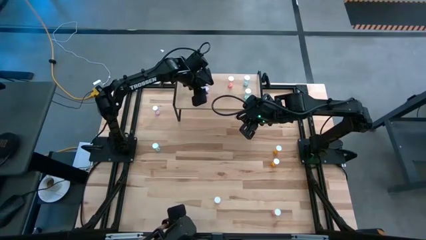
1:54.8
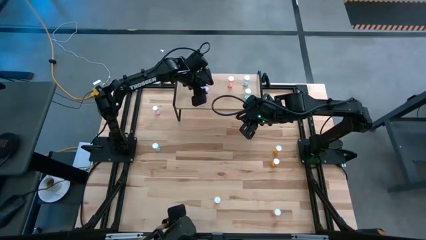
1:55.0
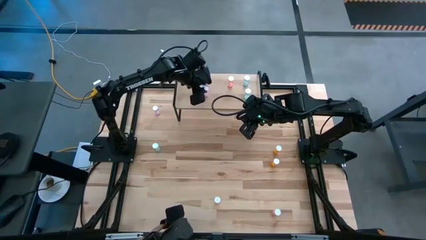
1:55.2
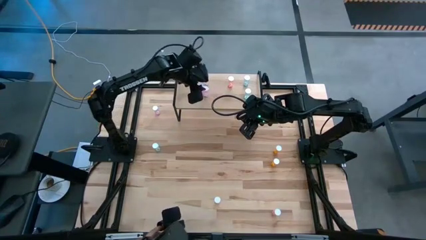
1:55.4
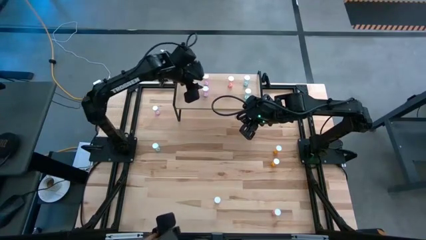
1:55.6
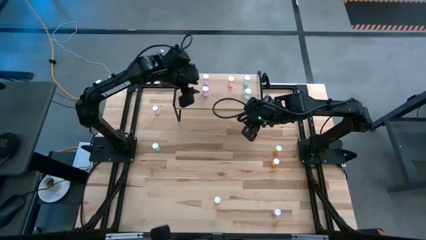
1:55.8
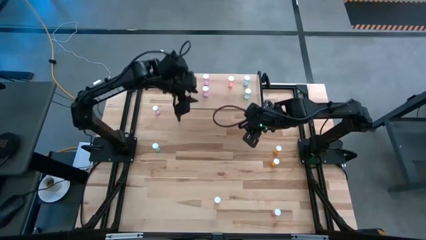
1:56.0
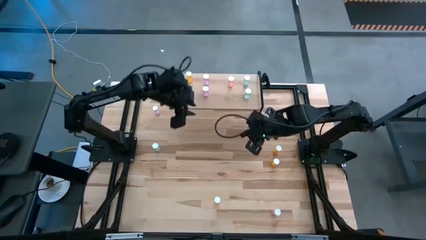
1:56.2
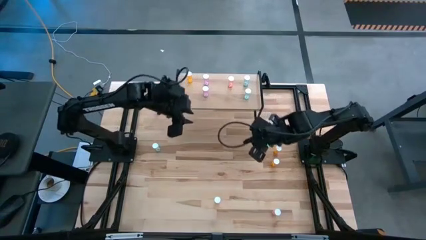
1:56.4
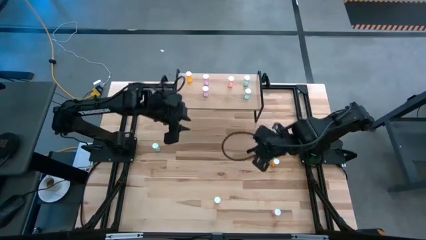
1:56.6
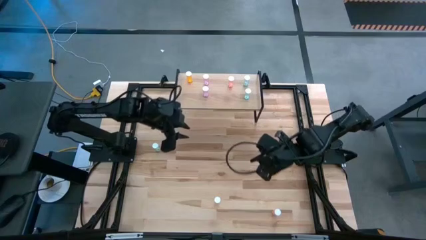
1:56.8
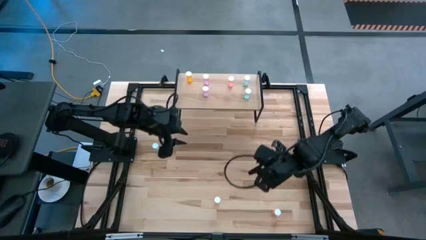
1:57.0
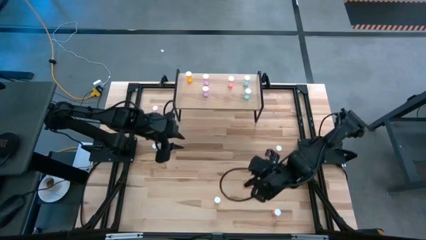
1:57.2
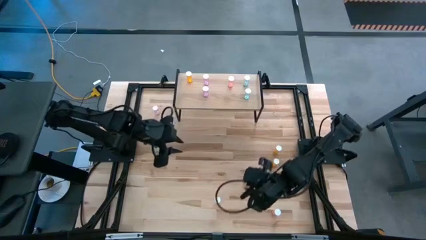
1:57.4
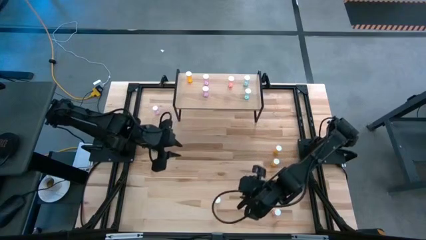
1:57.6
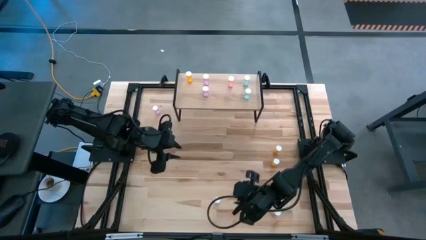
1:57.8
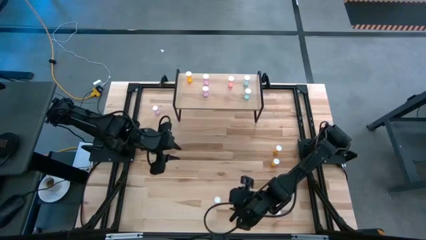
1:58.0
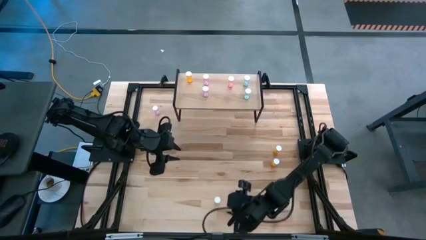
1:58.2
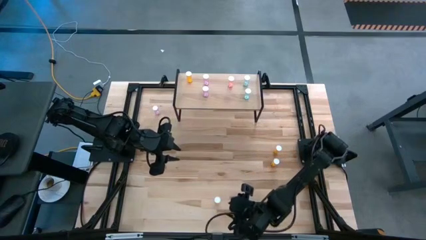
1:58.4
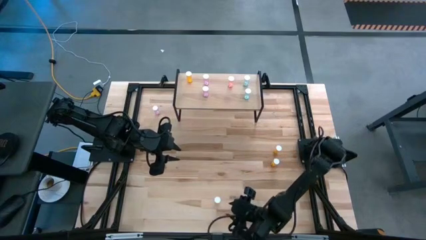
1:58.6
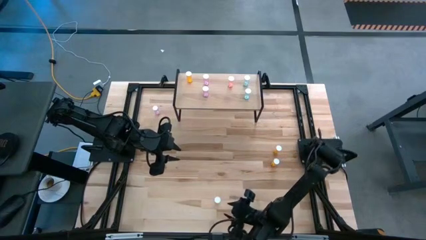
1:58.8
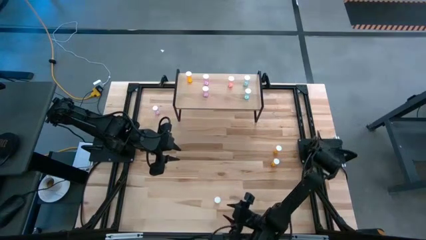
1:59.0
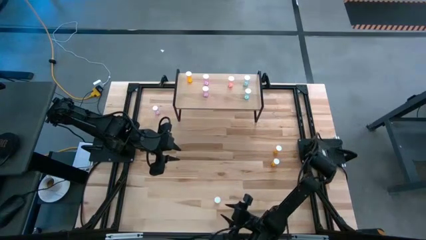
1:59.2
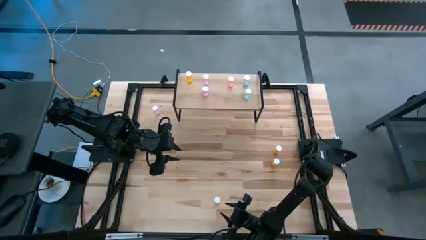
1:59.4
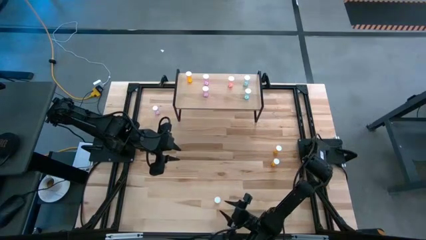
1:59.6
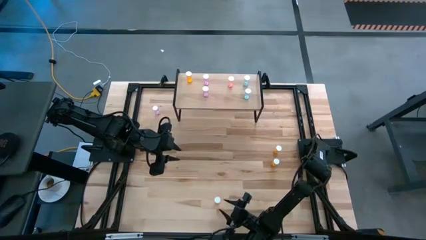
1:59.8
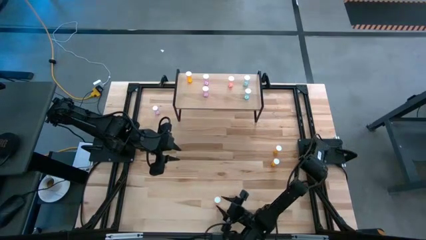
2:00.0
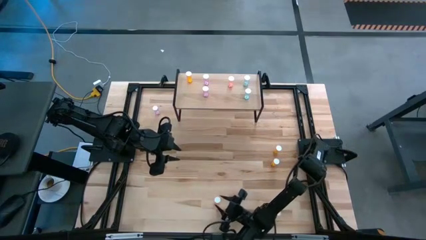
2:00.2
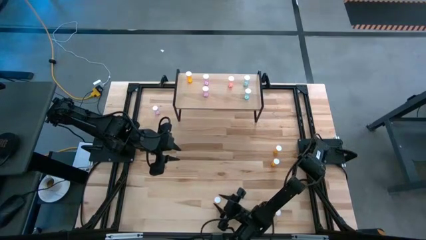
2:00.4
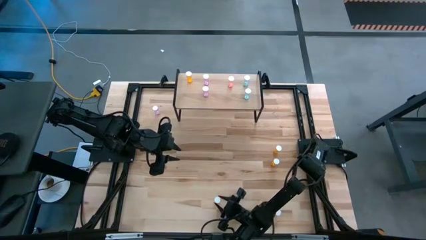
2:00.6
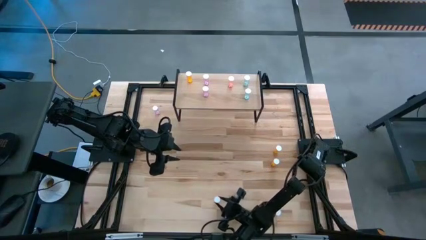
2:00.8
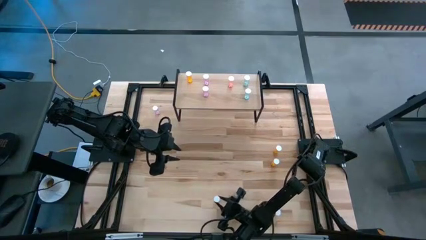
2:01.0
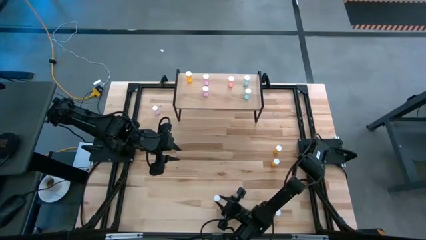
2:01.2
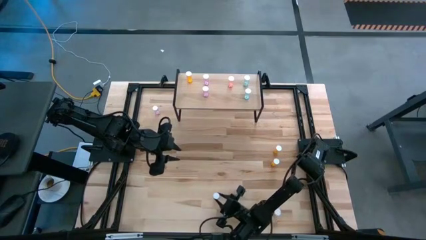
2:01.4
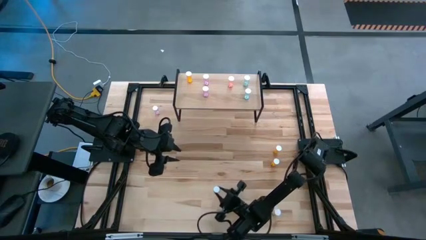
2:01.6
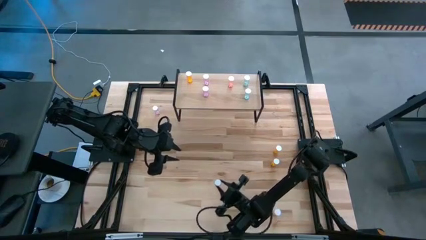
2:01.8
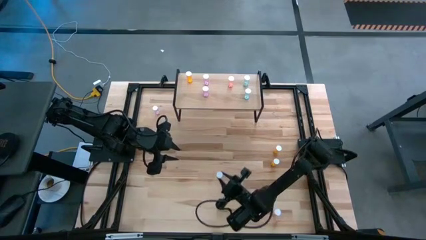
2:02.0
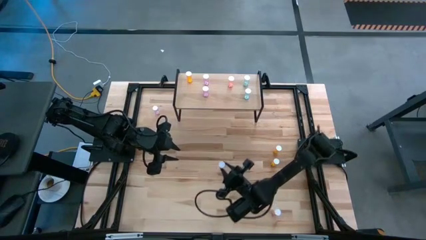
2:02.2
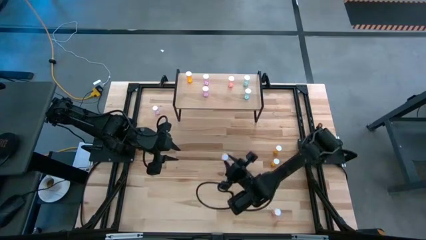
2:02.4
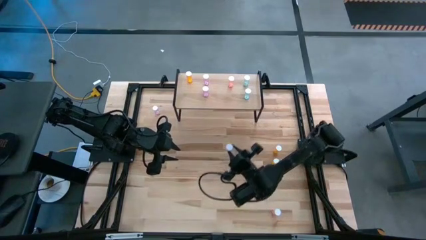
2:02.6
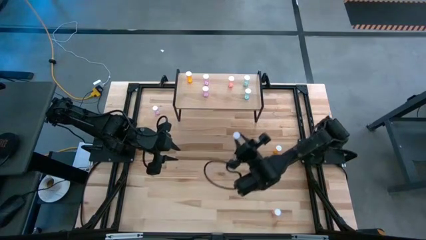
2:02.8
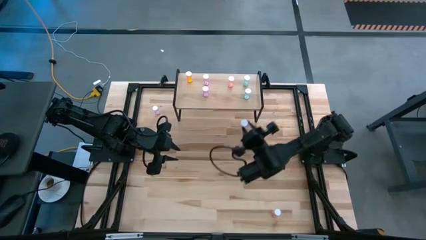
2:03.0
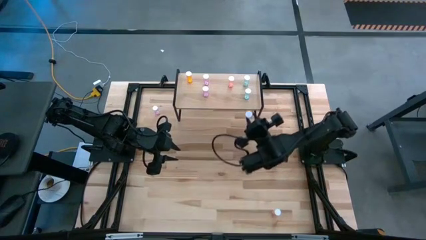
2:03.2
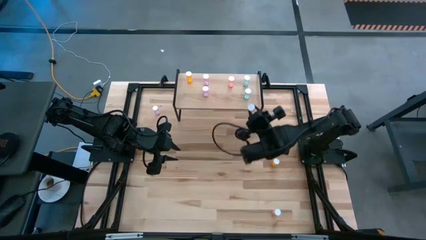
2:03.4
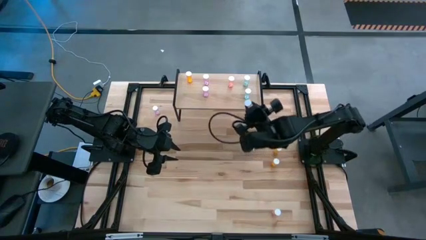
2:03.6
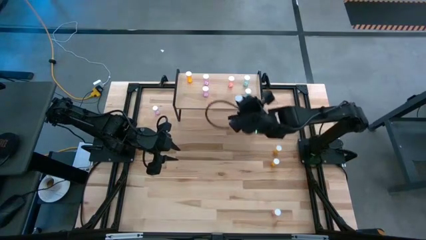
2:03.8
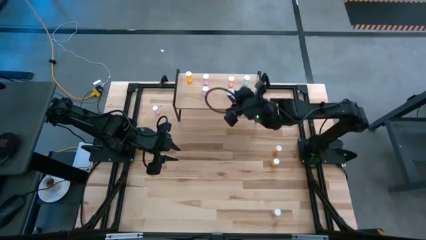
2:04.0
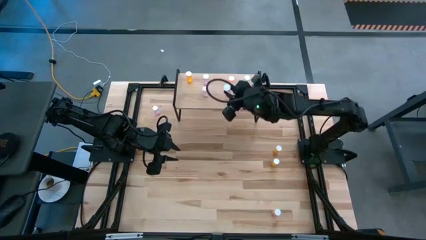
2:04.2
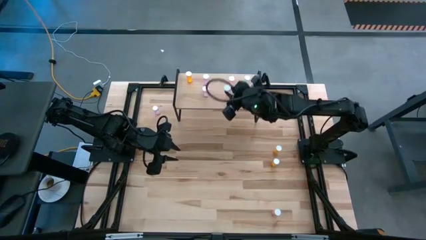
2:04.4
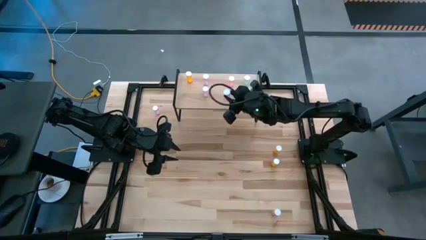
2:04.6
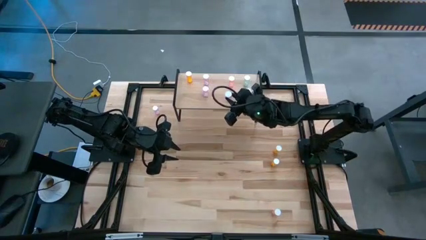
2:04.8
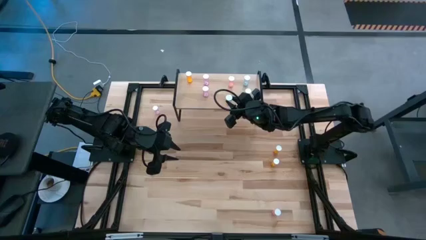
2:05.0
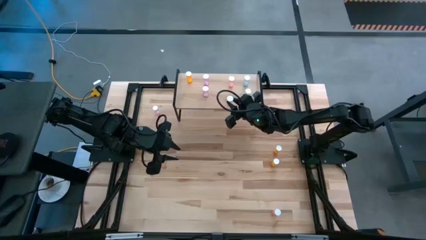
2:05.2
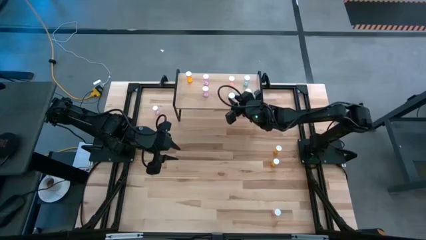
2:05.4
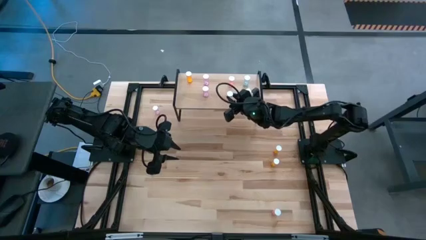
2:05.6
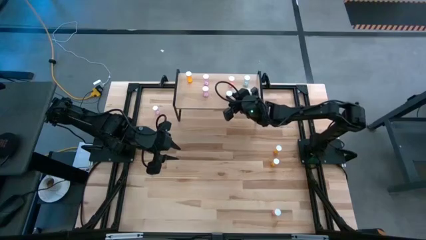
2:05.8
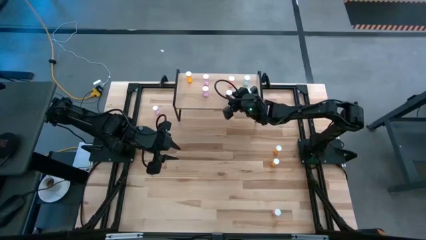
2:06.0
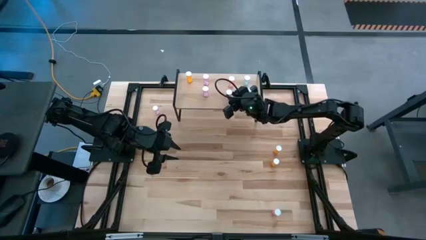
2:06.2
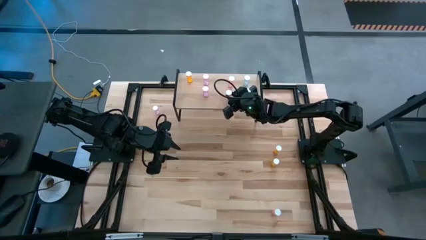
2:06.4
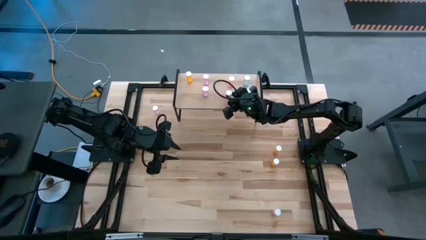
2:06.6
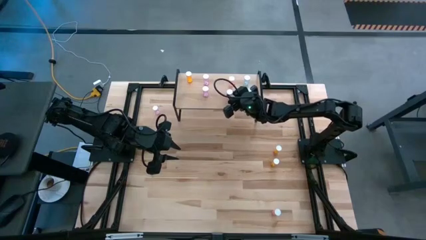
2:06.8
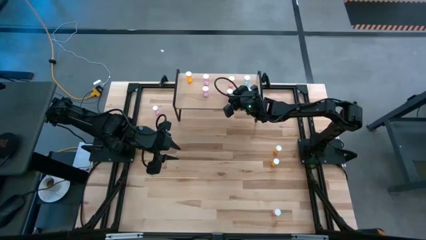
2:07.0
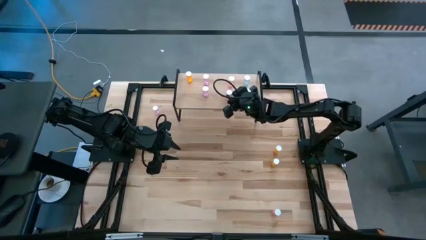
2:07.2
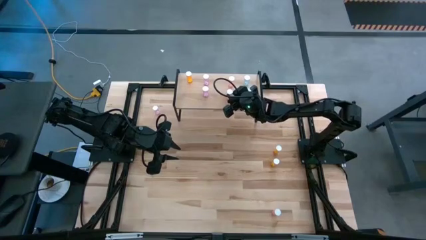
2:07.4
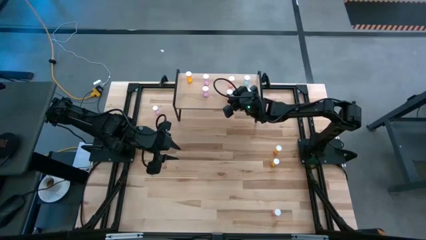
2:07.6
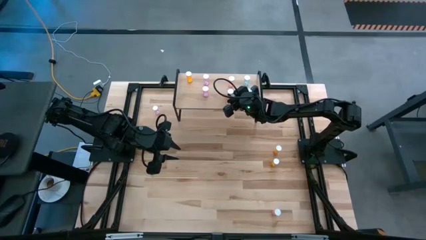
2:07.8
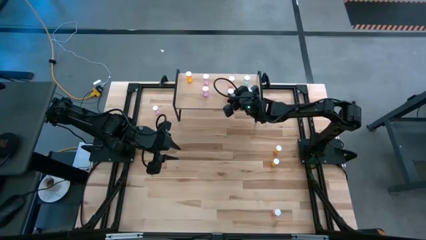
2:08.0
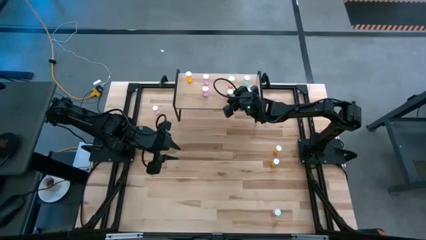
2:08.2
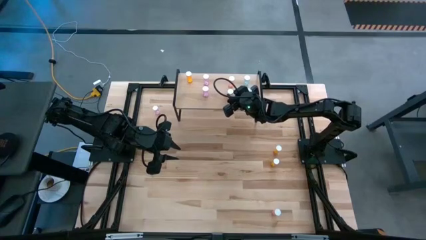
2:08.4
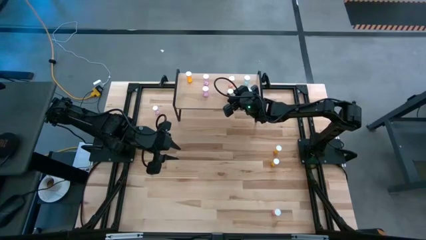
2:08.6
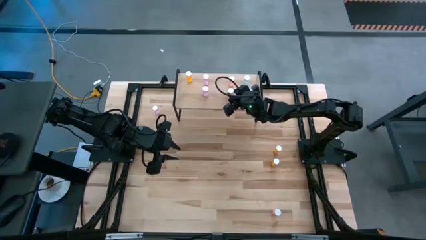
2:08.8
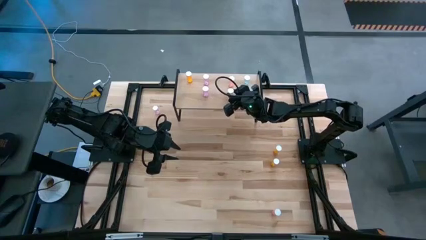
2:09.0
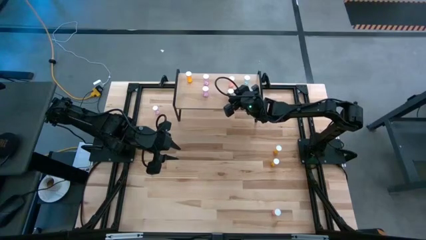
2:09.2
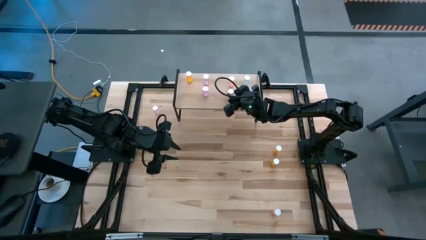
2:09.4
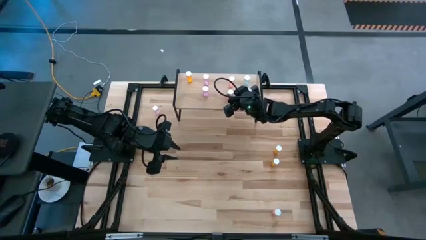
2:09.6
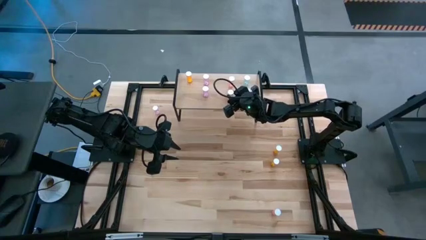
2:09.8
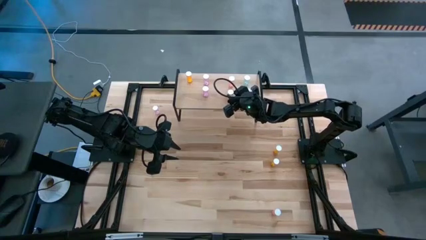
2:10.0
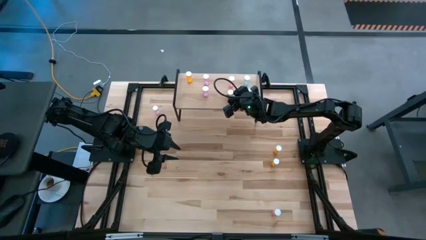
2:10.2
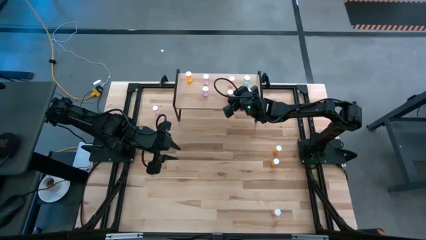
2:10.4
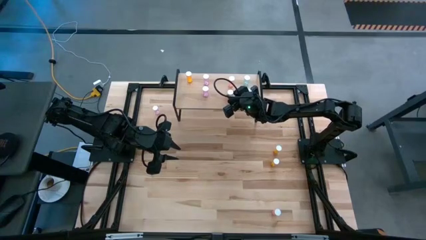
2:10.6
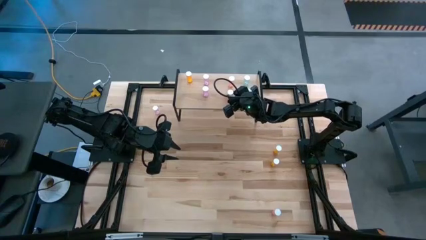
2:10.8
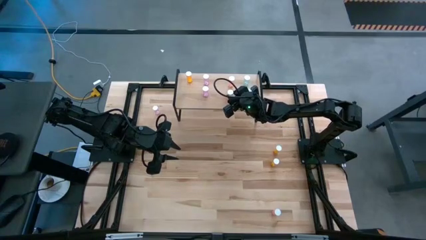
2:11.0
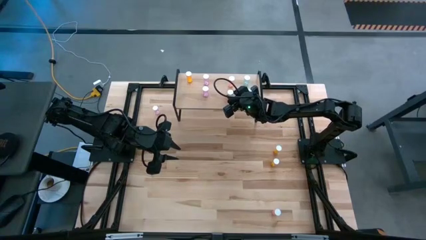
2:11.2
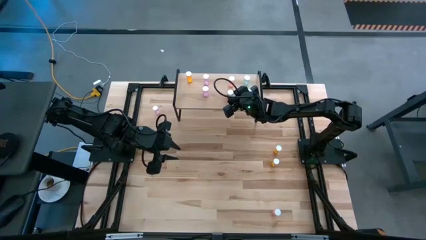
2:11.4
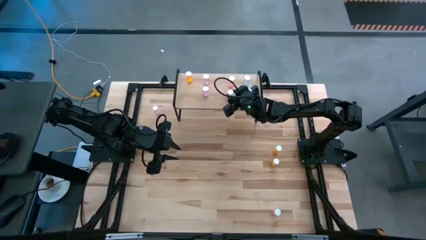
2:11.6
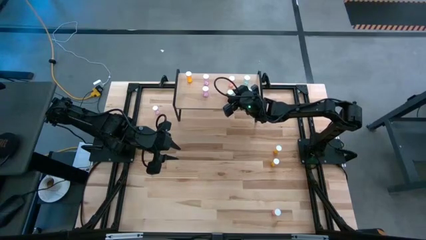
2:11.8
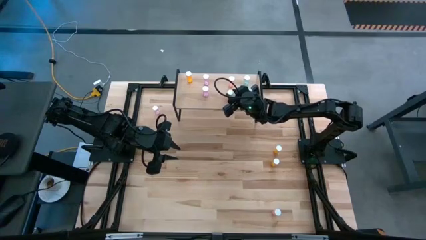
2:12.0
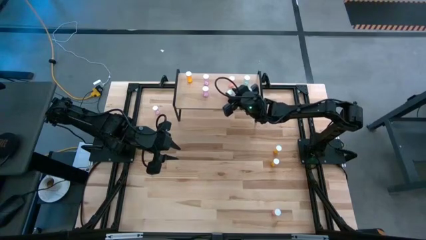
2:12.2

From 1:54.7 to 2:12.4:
Task: Pick and place medicine bottles onto shelf by color
Put the left pink pill bottle on the shelf aligned with the other pink pill bottle
